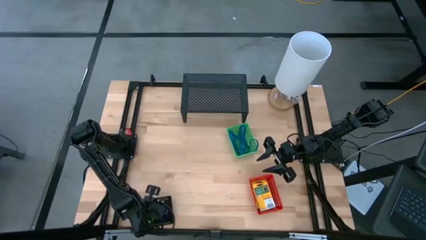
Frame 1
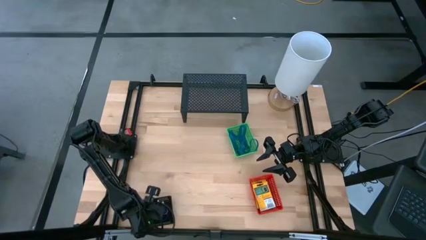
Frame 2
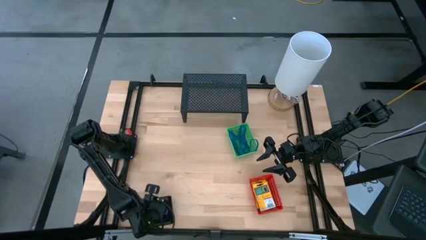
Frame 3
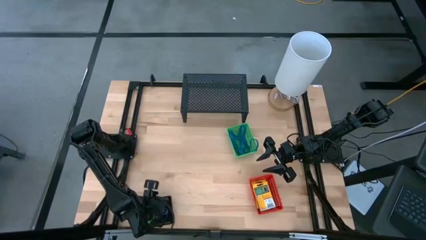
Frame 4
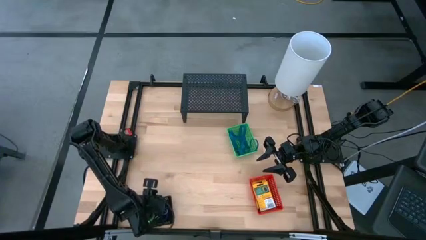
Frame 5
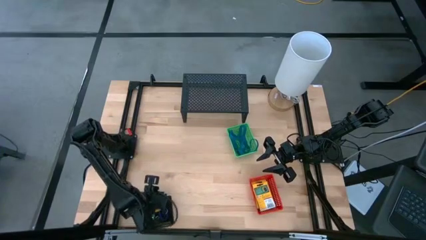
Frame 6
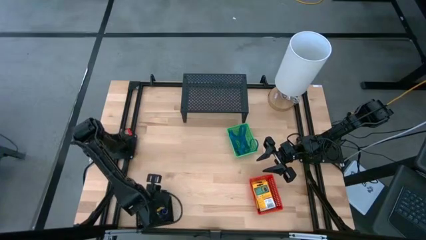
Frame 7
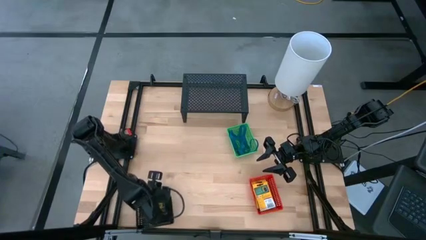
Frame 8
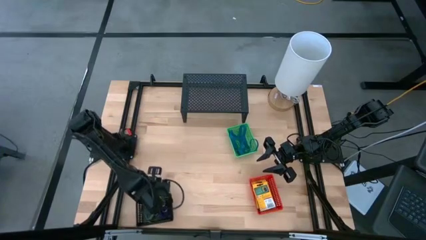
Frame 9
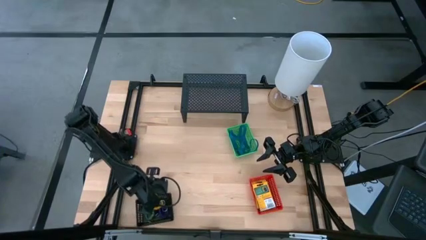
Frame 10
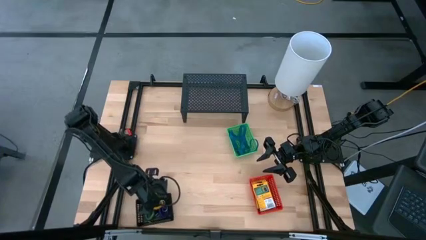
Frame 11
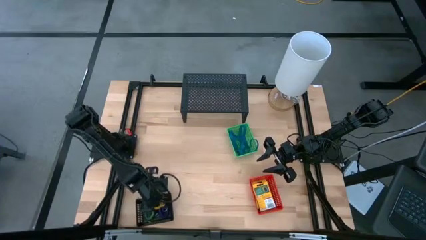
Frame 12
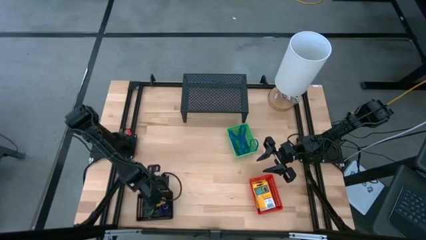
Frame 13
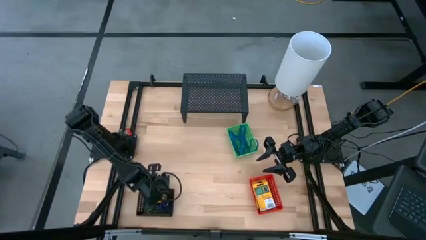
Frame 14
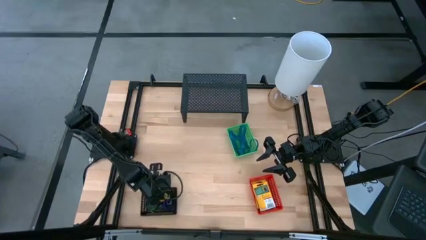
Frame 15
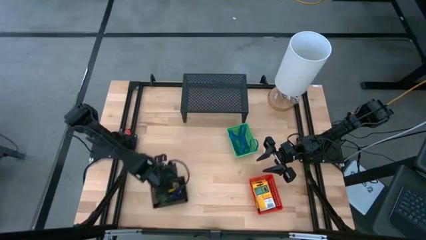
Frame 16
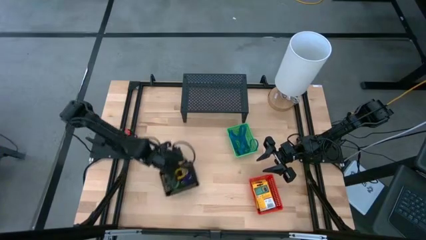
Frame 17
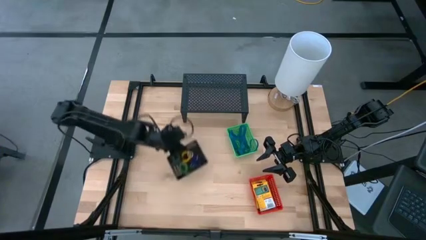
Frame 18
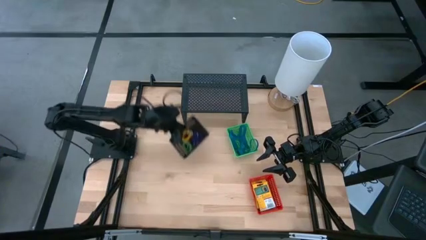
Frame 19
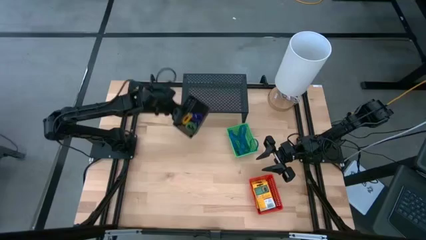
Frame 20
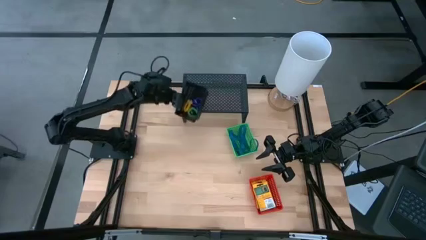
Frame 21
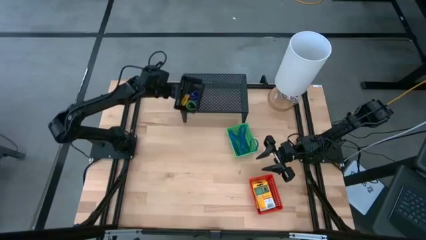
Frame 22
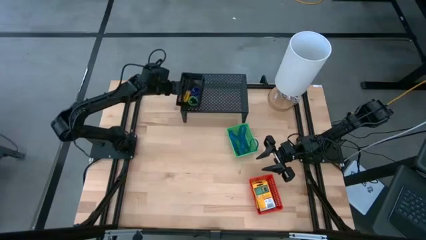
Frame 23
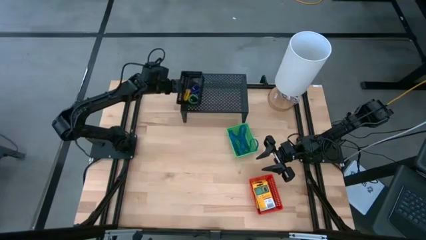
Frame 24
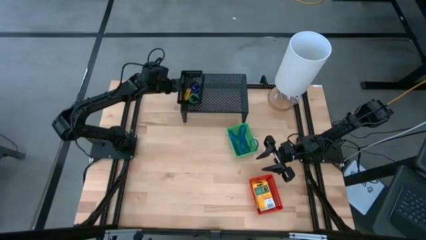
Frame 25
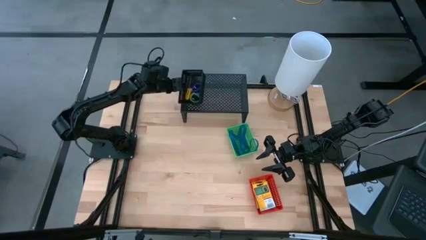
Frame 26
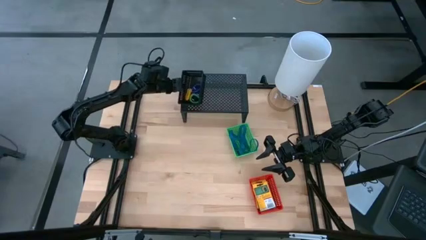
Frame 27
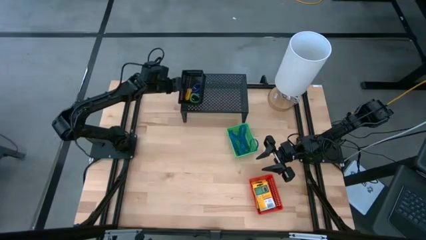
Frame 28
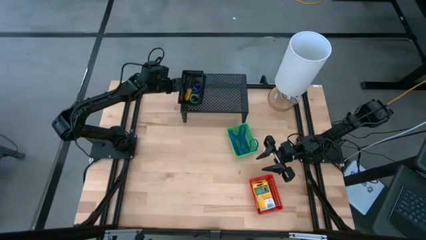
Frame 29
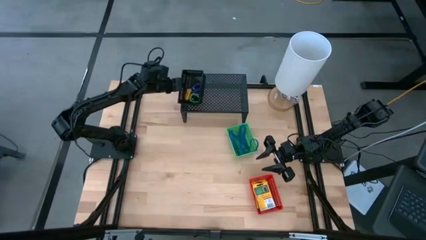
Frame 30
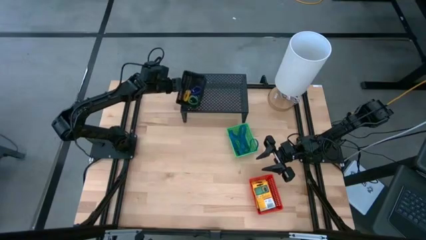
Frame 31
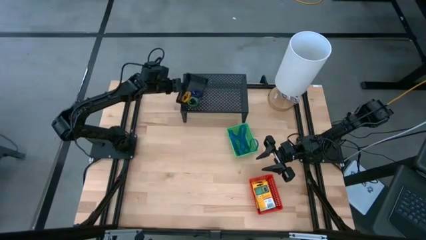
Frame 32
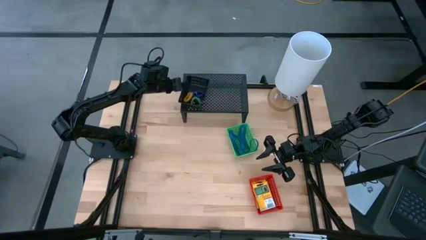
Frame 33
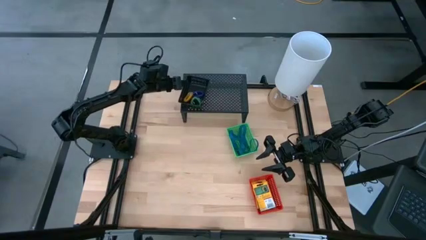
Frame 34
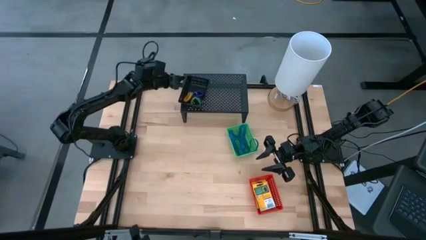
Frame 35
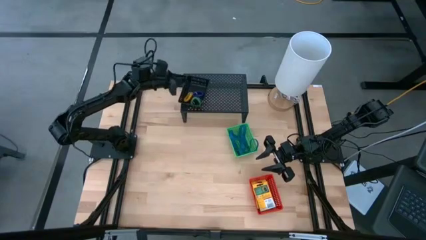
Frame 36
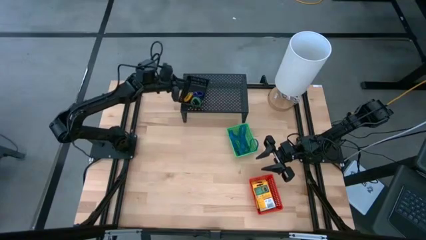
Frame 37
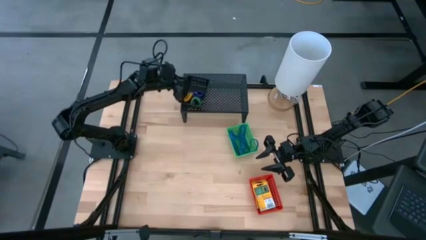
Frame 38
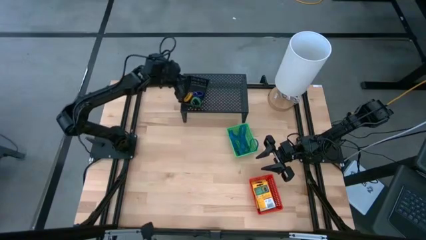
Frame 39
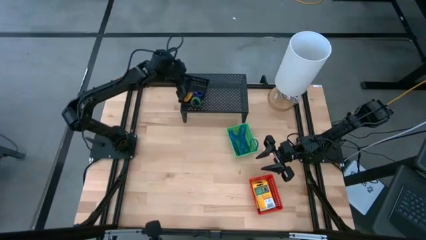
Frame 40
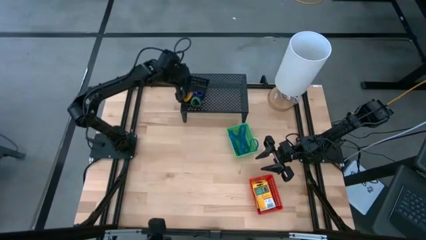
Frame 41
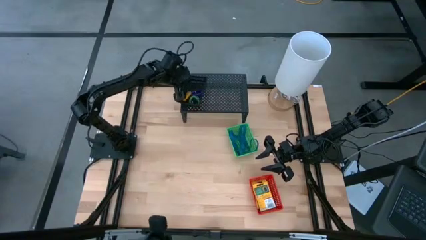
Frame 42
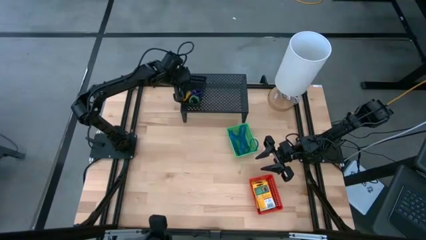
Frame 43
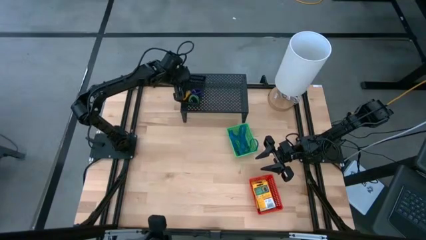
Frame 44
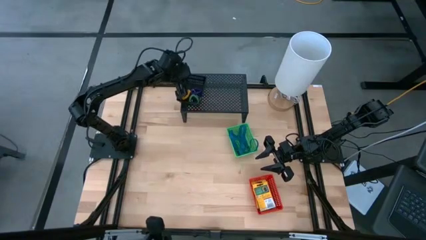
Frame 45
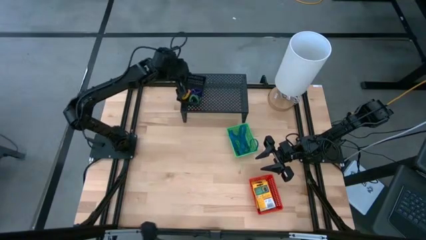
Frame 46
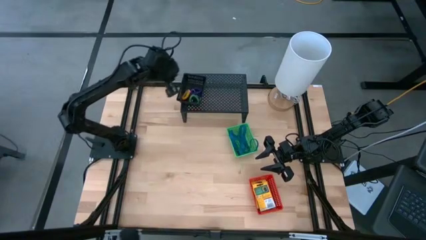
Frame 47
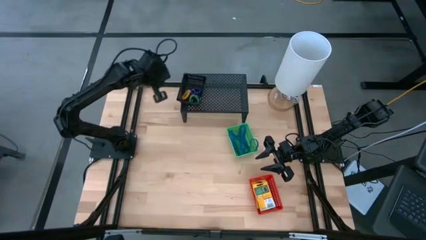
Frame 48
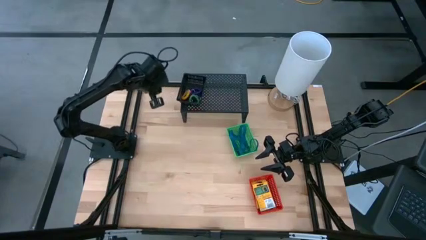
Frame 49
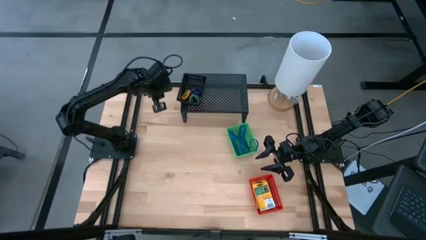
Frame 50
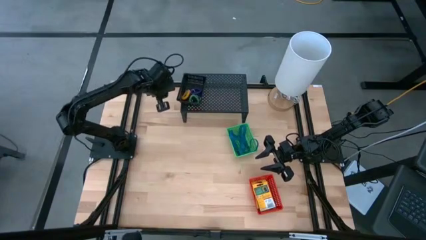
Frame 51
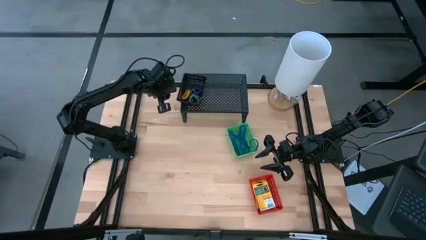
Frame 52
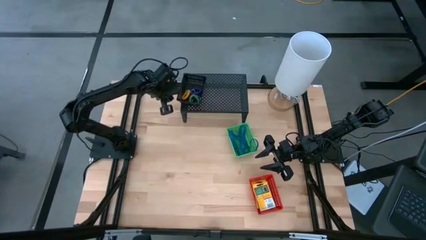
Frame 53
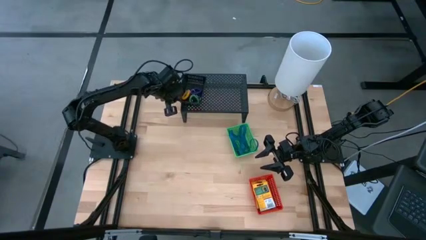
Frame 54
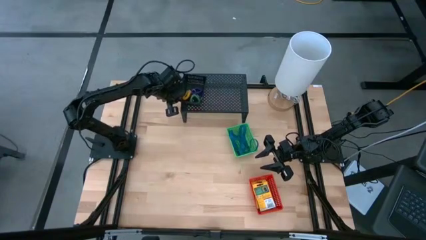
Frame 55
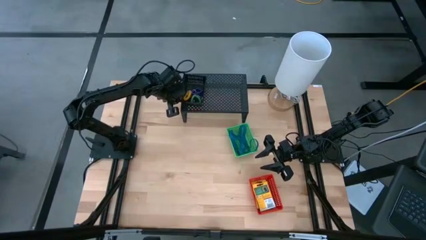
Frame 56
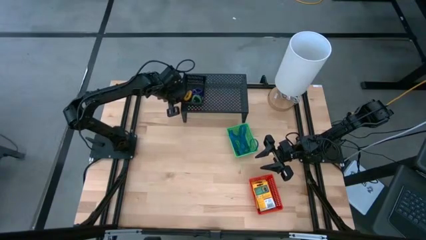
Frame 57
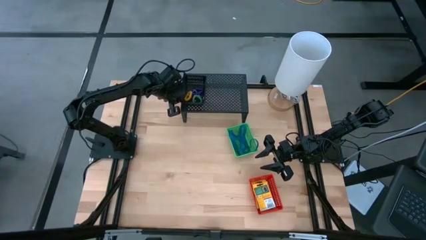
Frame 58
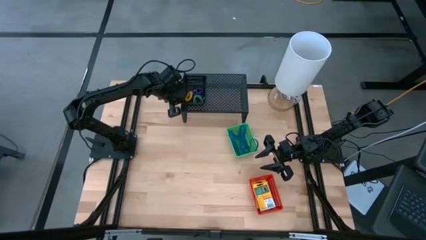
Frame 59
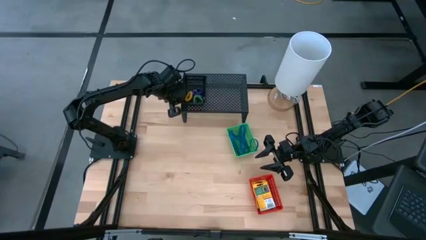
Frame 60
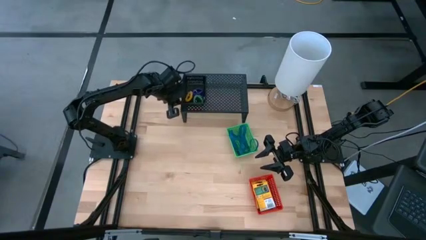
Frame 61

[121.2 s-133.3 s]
Task: Pick & Place Office Desk Supplies
Put the black basket on the shelf

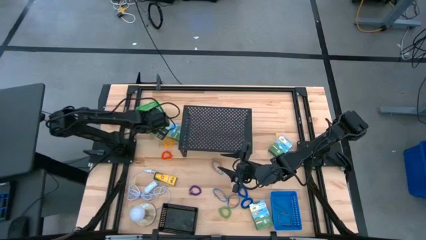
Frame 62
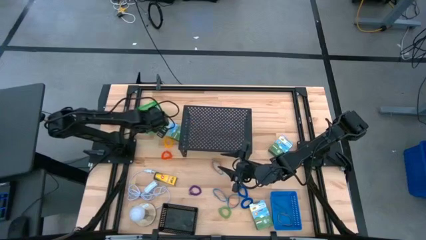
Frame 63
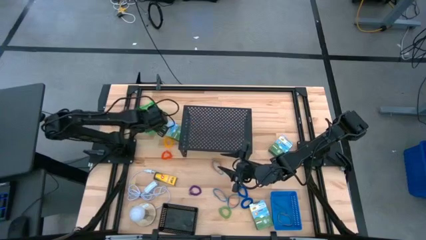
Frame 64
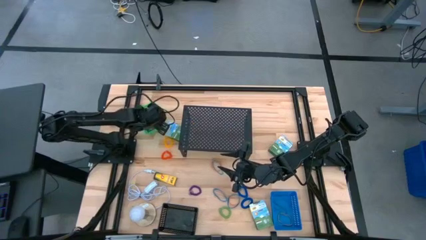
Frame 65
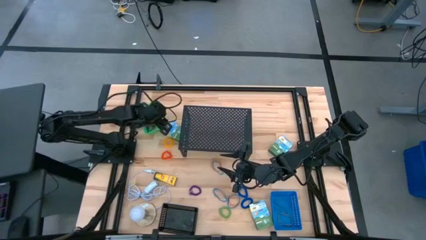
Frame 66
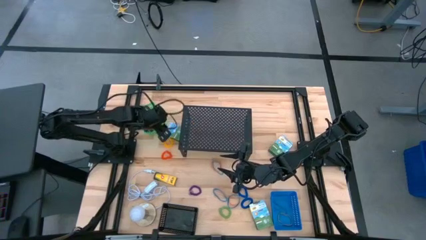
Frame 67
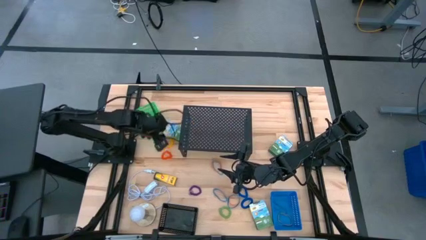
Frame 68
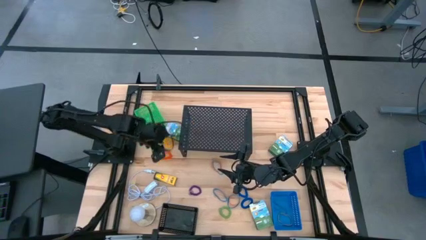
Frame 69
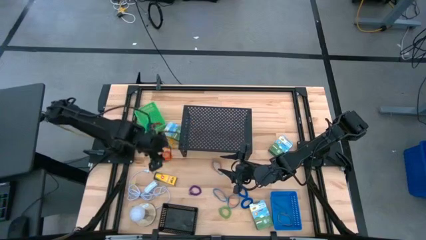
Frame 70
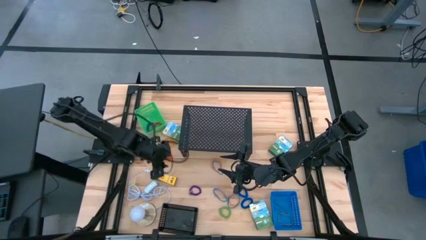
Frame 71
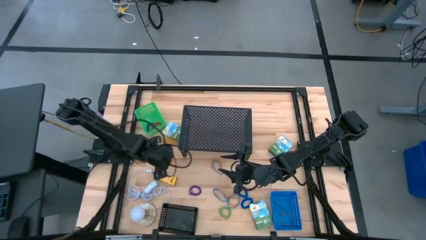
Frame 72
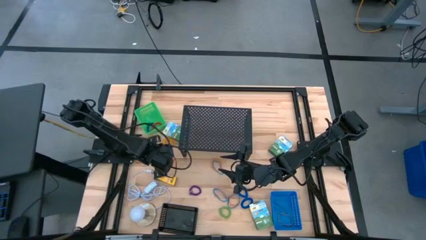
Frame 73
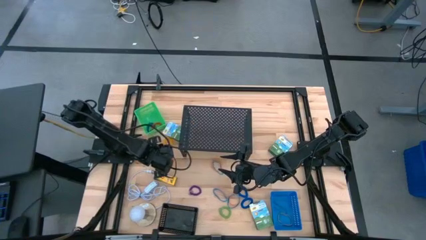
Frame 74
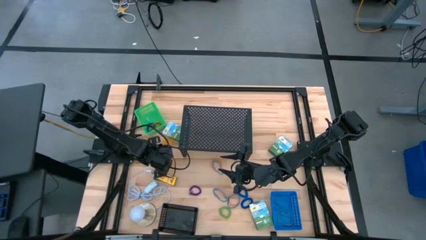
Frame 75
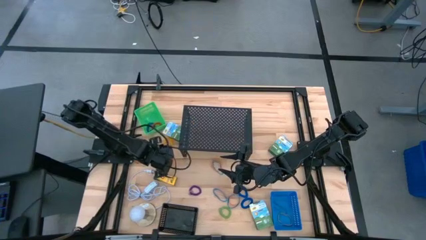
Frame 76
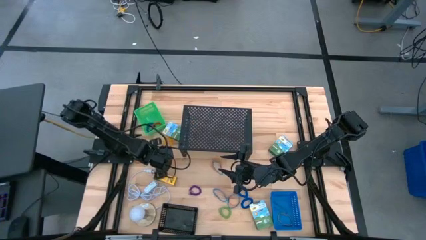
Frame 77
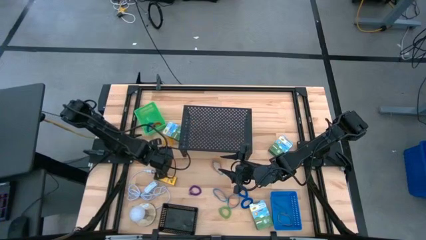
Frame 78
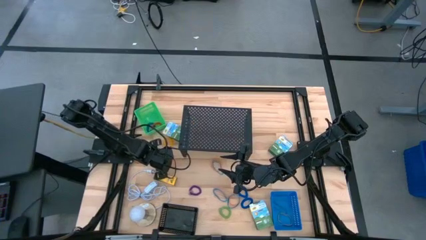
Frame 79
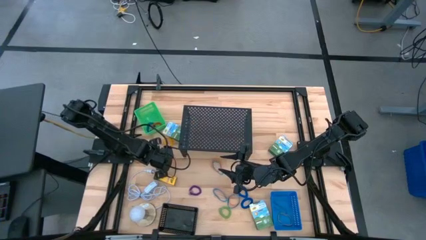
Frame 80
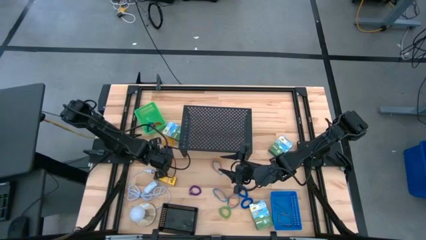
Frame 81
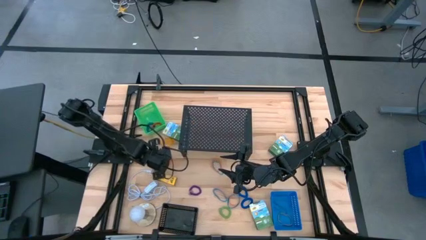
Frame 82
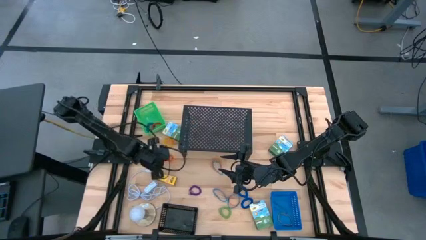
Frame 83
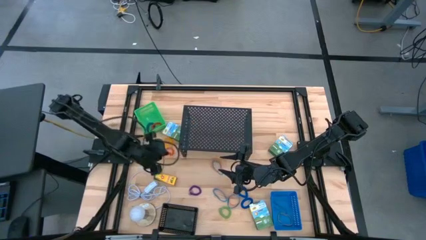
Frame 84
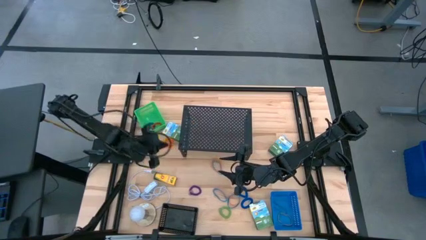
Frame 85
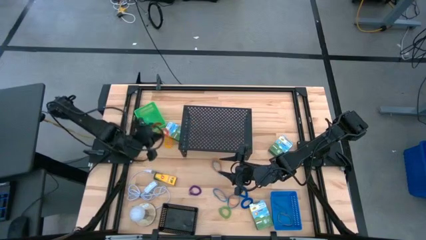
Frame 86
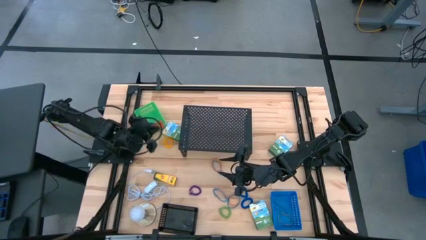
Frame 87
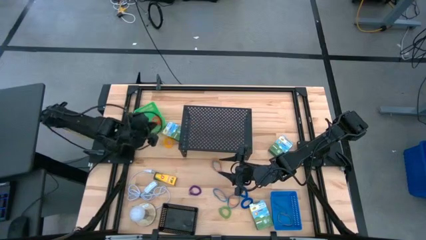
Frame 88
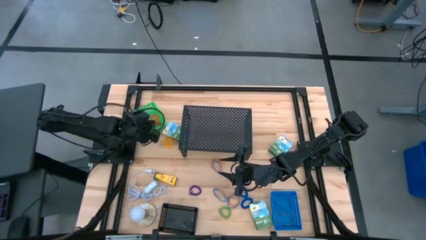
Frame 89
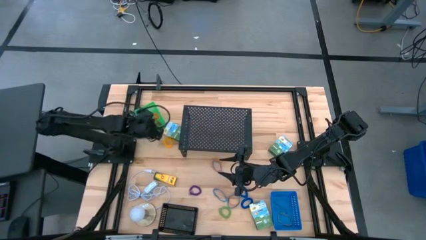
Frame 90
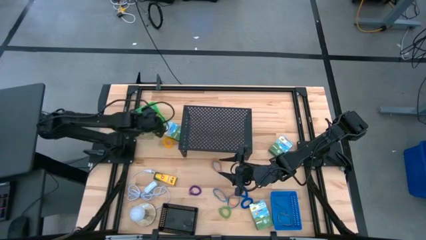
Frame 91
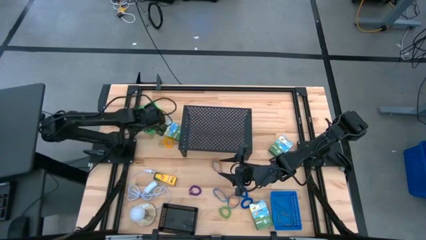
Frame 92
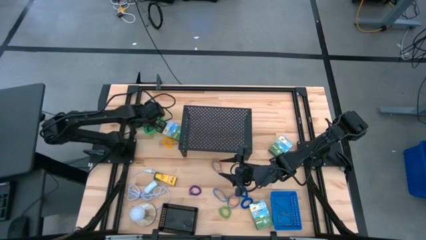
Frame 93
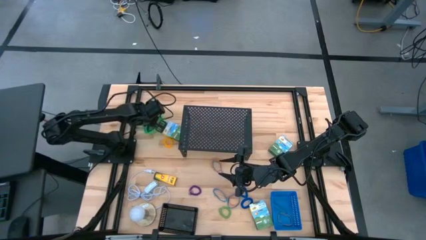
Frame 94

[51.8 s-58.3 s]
Task: Pick & Place Office Desk Supplies
Put the orange spring keychain into the green bin
